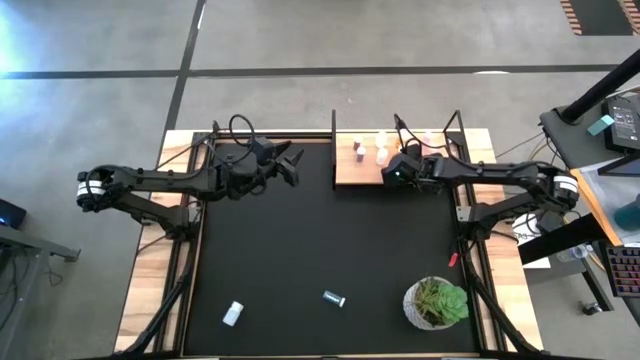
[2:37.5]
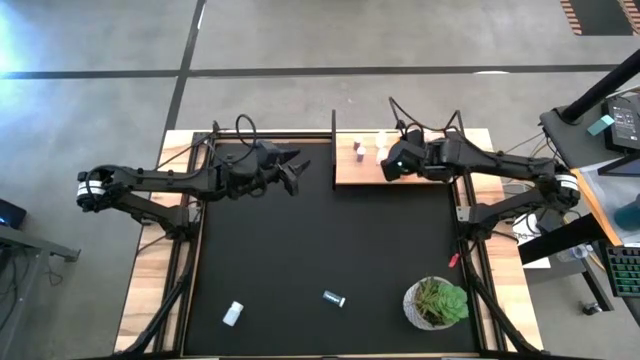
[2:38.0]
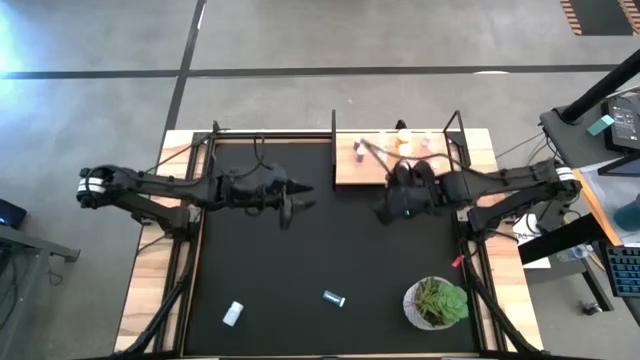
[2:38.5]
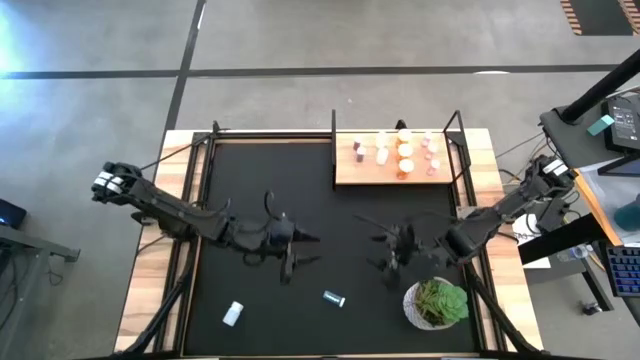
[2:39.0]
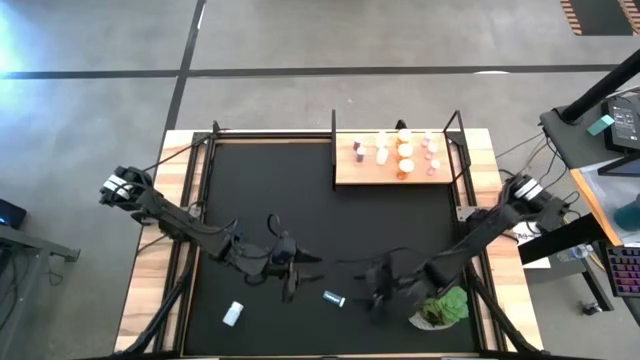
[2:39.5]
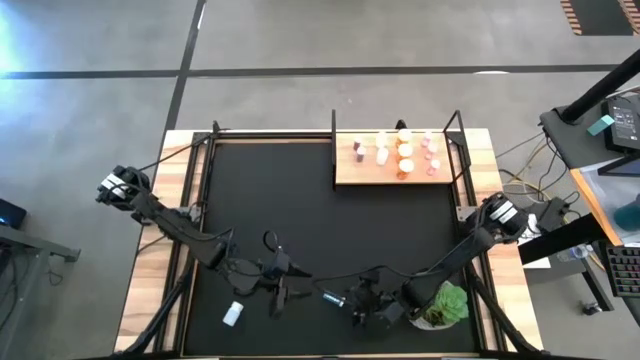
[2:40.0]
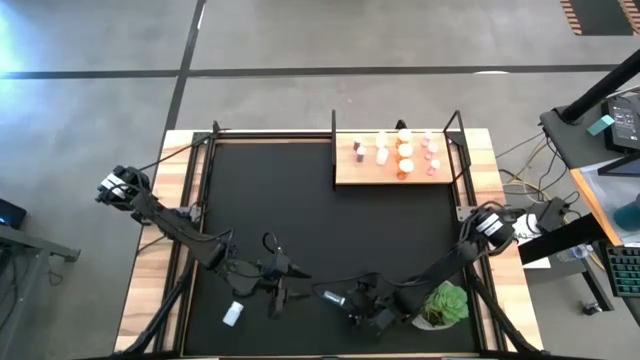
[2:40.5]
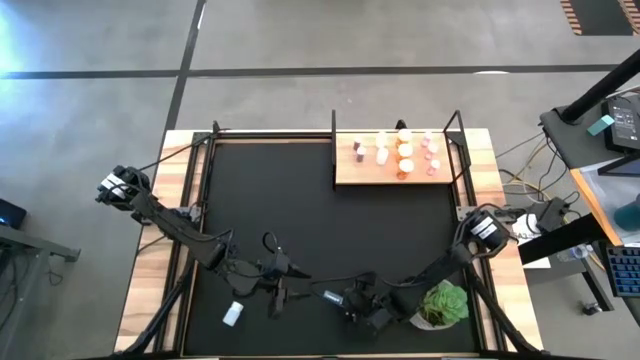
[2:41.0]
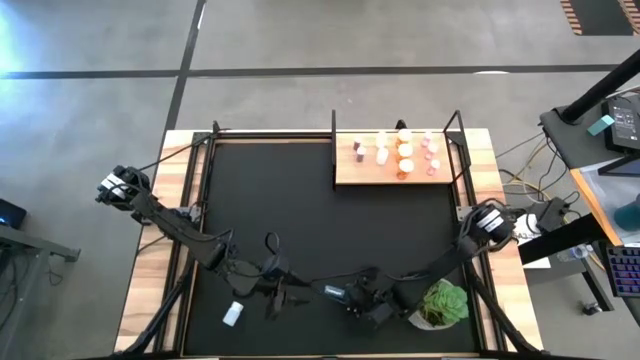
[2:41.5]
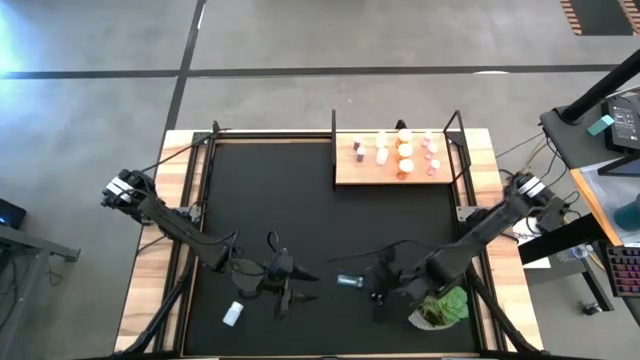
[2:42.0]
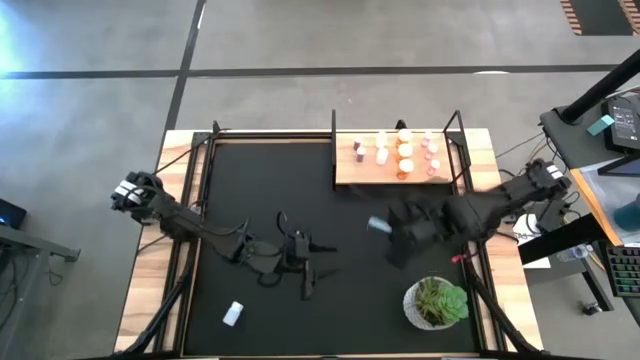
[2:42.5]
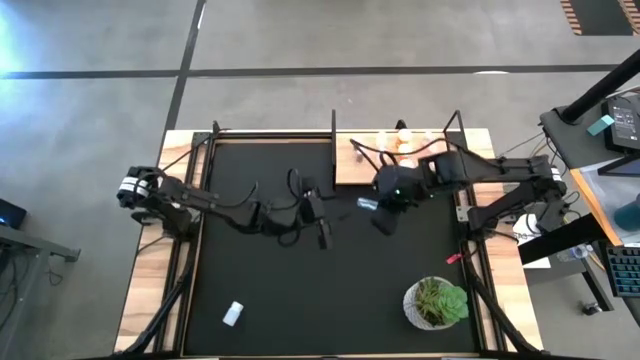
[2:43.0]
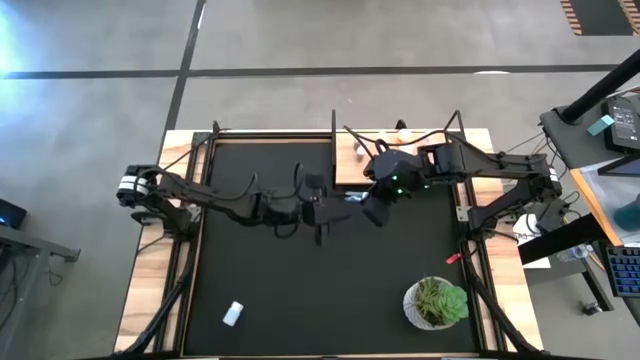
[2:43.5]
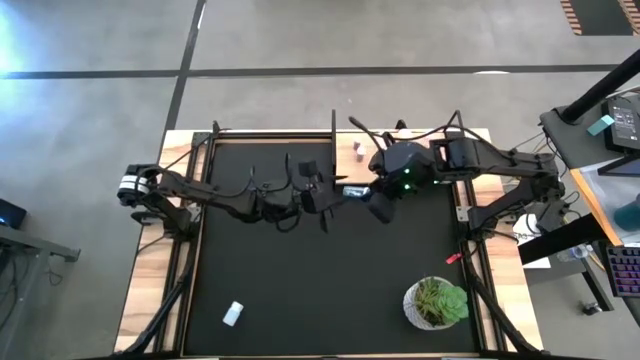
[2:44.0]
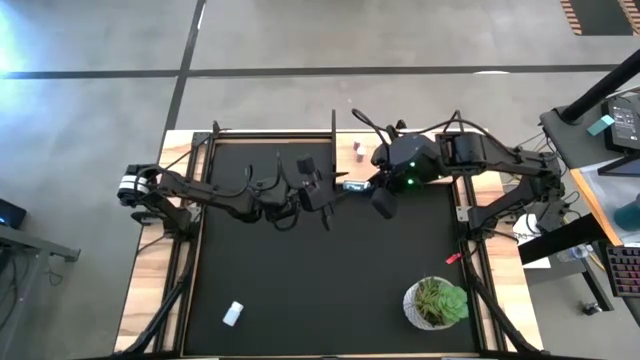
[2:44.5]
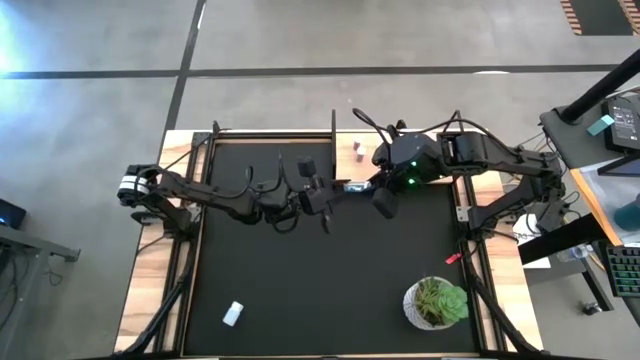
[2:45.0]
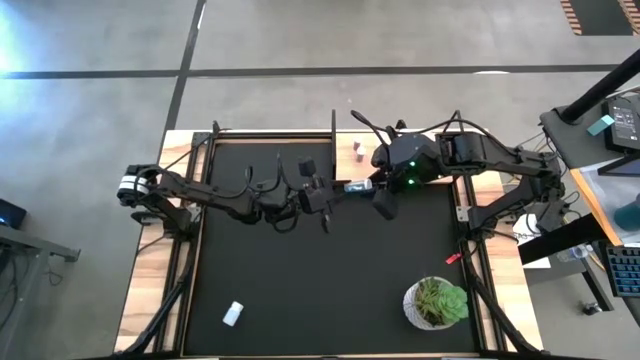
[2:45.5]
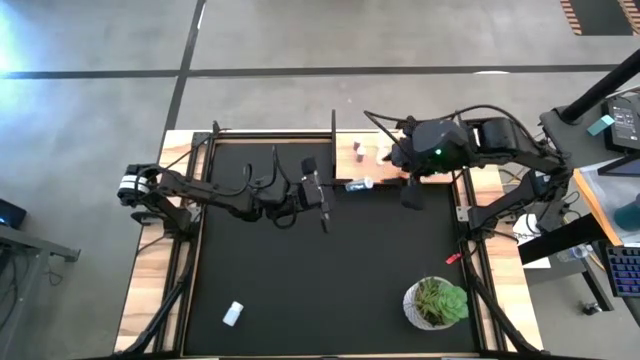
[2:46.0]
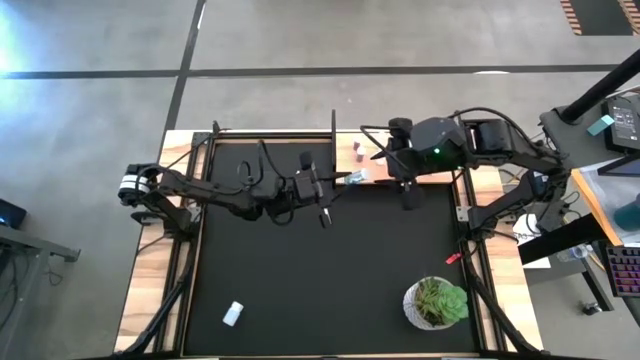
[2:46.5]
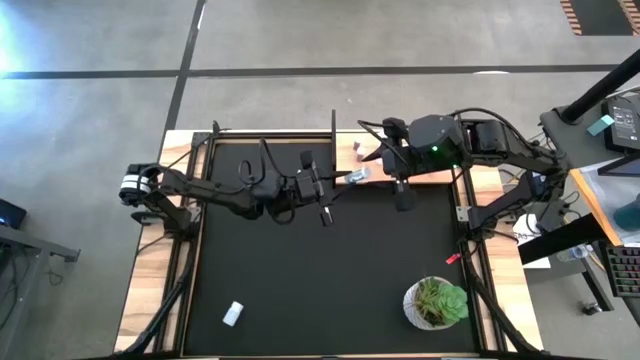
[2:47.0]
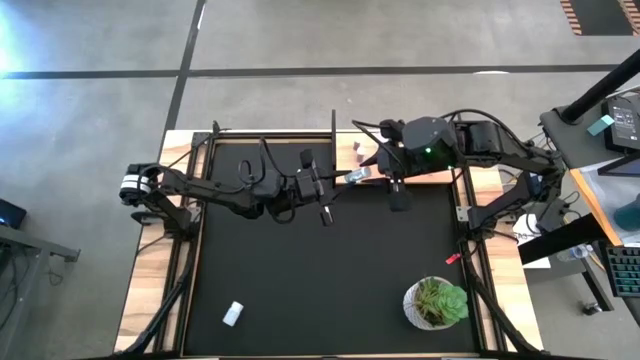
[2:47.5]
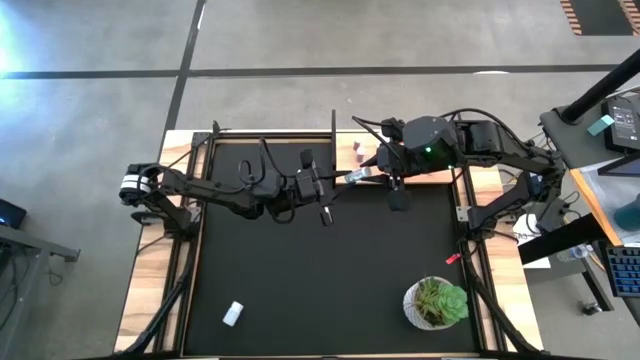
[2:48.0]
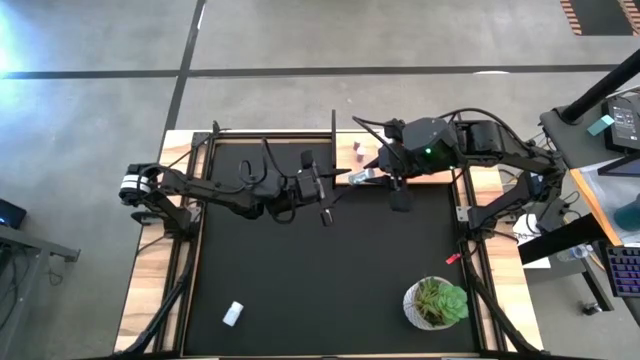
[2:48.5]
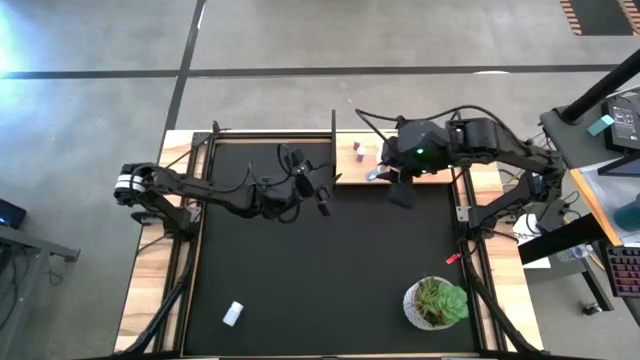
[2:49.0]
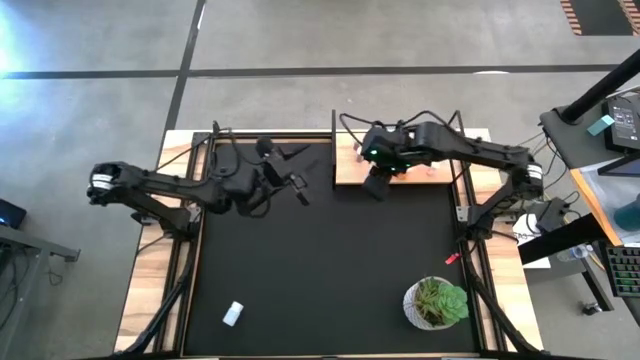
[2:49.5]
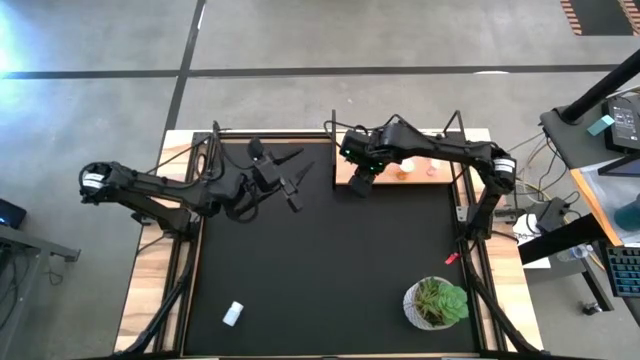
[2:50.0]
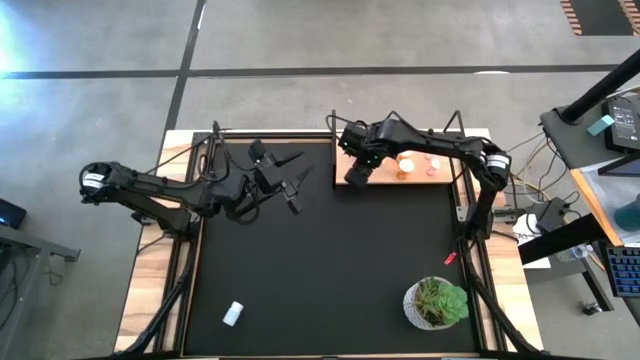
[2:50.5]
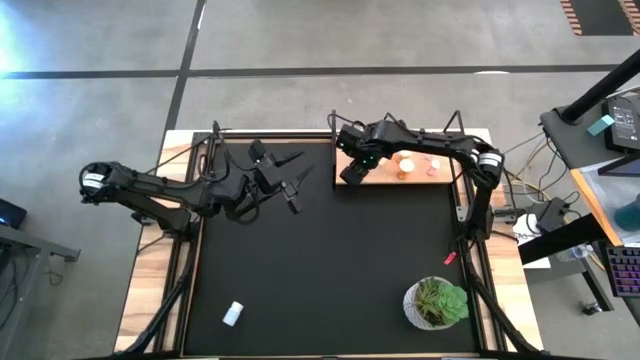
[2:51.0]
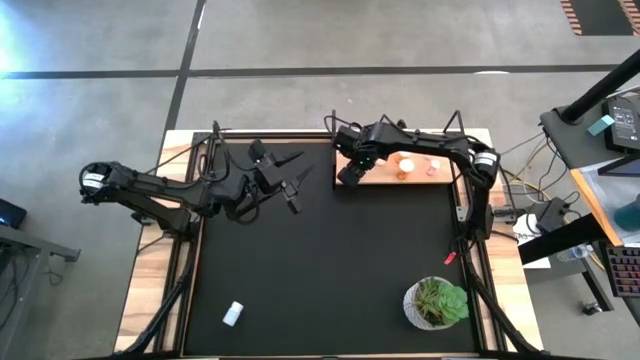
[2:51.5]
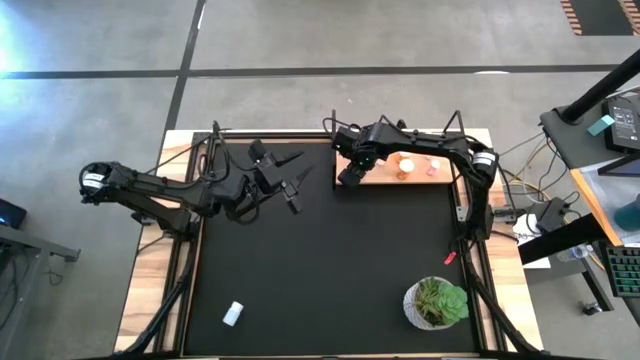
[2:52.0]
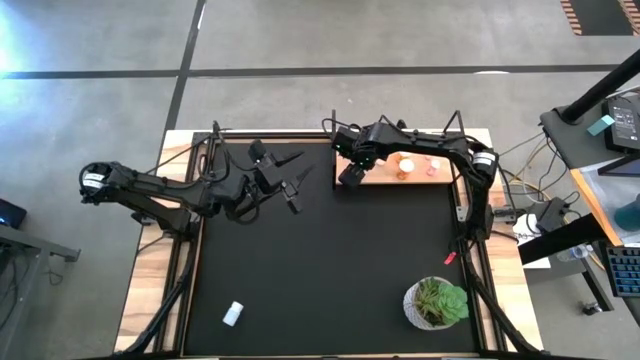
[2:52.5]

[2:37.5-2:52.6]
Task: Pick and place medicine bottles onto shelf by color
Put the blue pill bottle on the shelf aligned with the other blue pill bottles

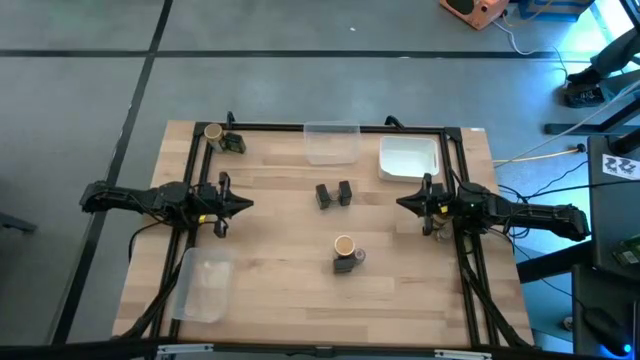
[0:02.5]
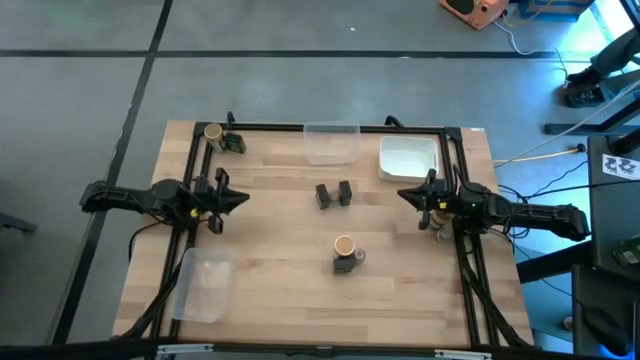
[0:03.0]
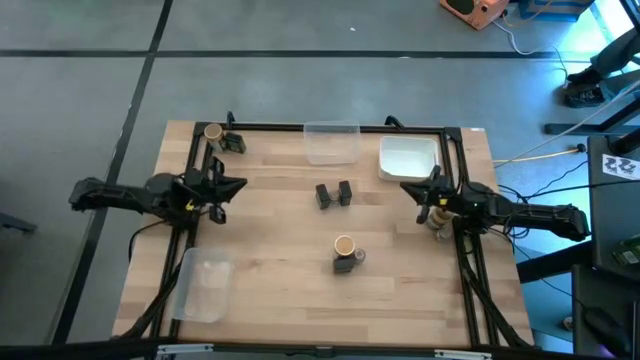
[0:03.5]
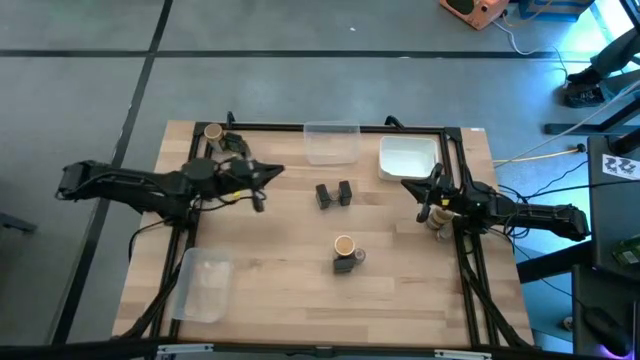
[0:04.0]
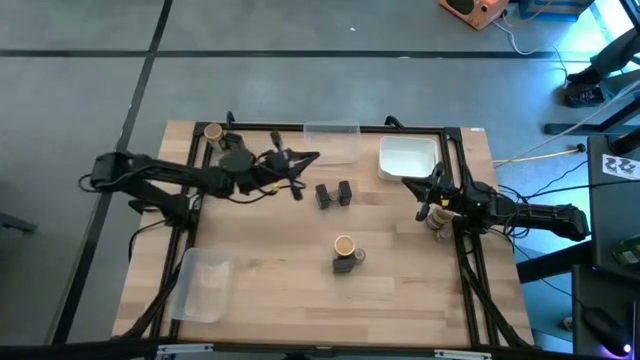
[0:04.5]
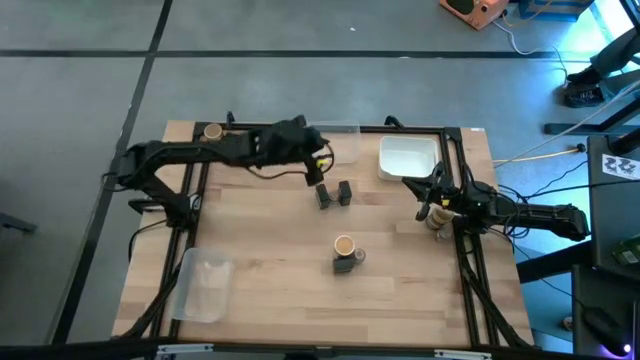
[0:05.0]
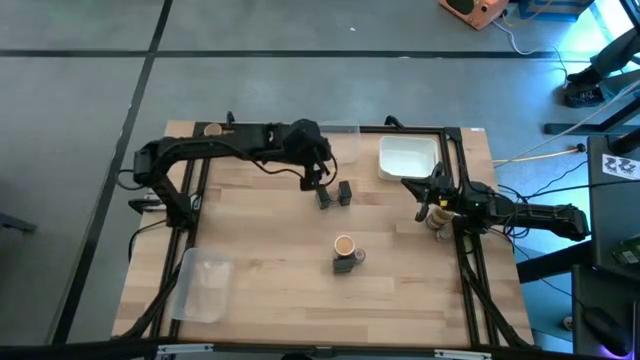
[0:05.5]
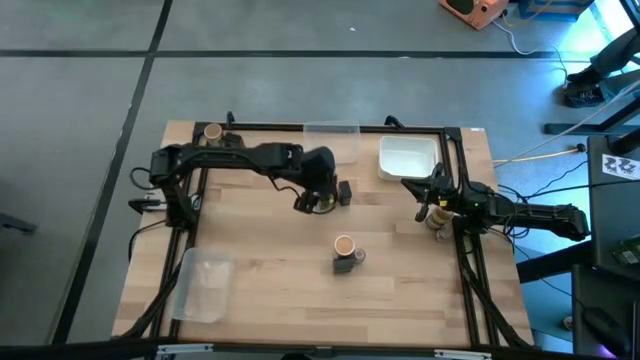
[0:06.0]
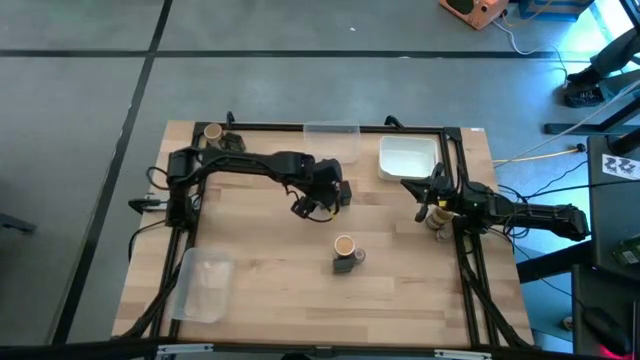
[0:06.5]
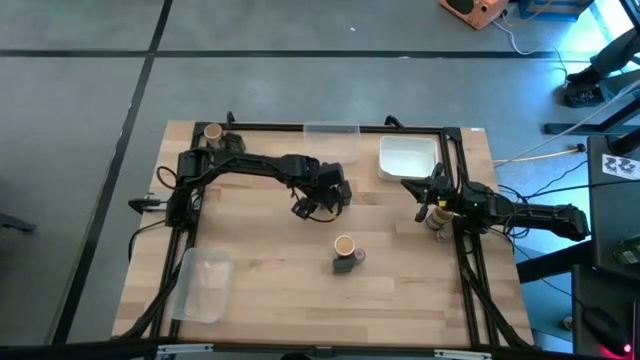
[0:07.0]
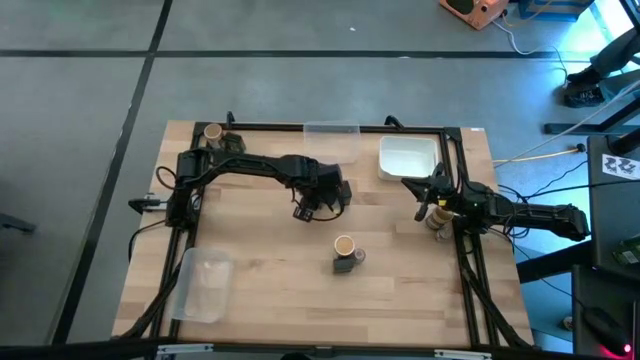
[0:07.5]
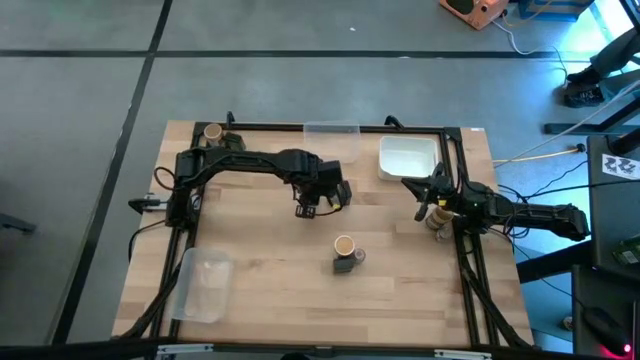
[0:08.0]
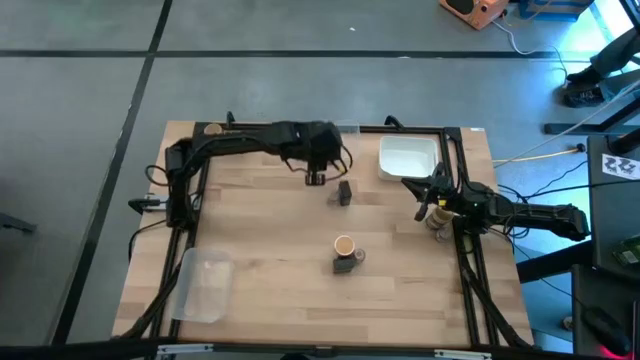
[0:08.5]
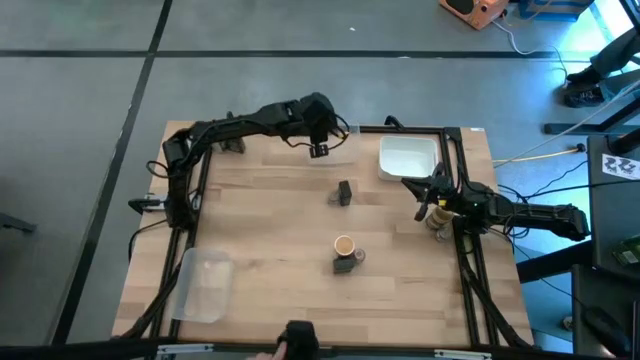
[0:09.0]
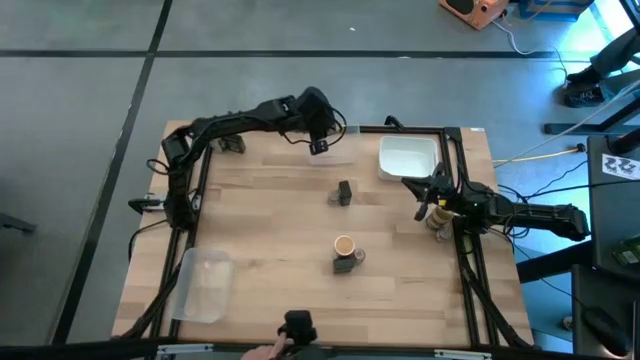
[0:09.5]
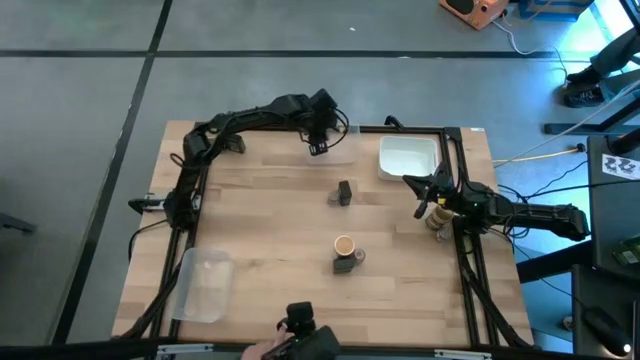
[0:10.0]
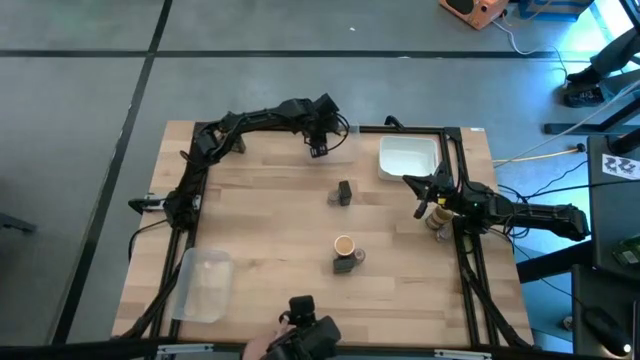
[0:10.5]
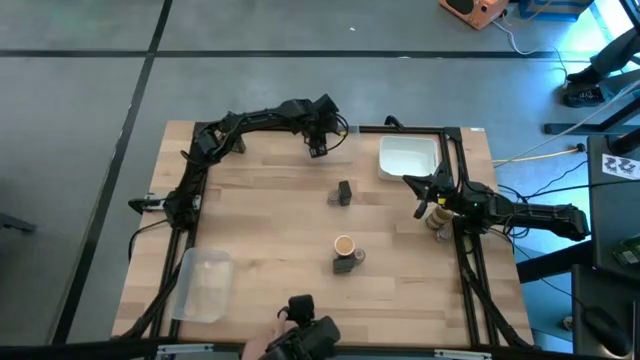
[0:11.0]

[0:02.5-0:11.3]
Task: Sort spices by type
Put the middle left black seasoning can into the top transparent bin
